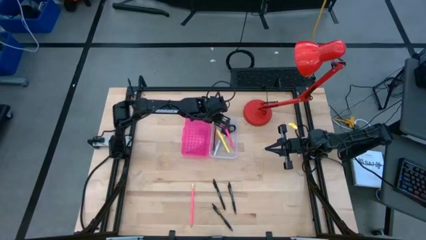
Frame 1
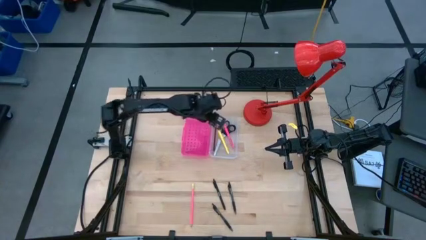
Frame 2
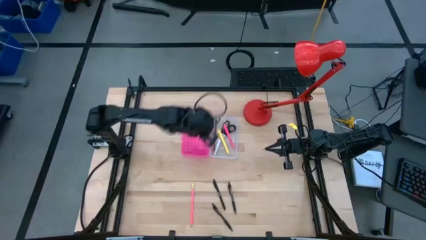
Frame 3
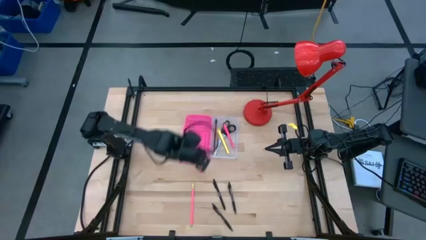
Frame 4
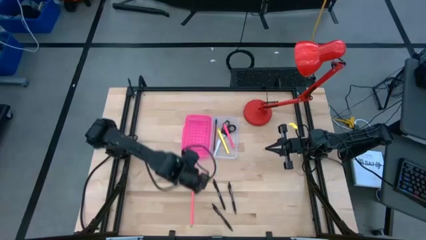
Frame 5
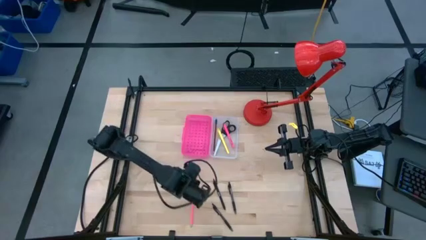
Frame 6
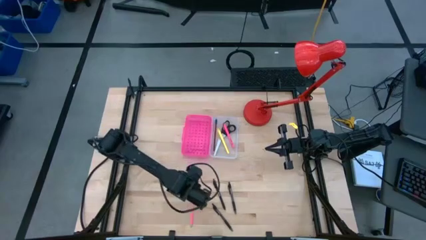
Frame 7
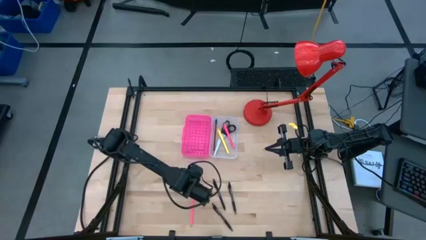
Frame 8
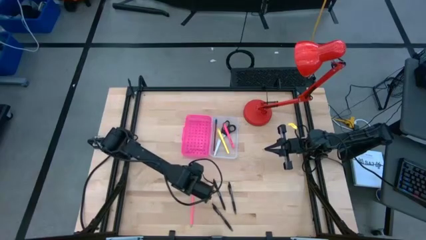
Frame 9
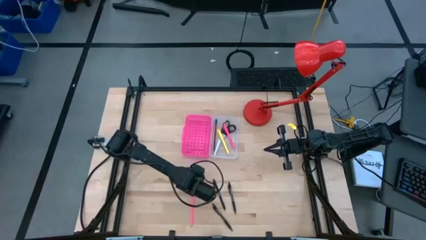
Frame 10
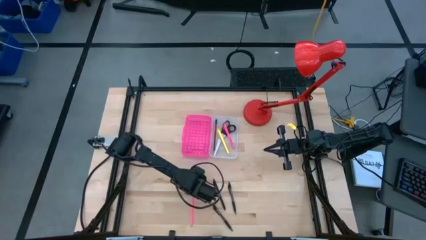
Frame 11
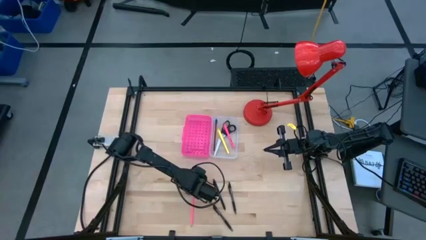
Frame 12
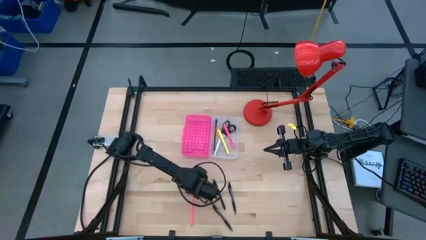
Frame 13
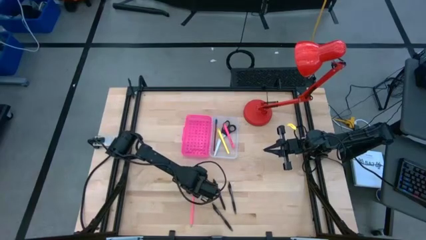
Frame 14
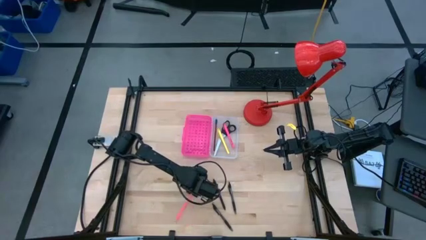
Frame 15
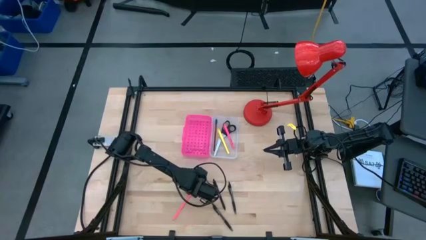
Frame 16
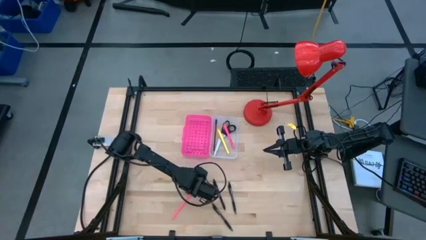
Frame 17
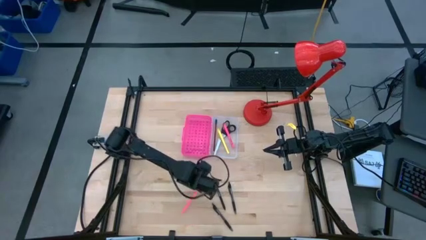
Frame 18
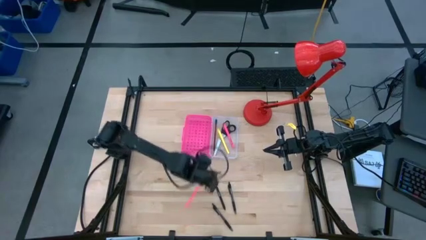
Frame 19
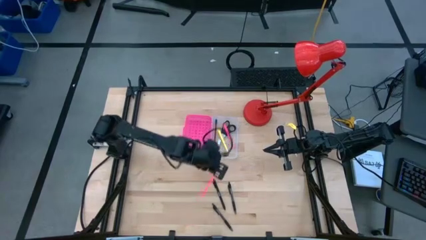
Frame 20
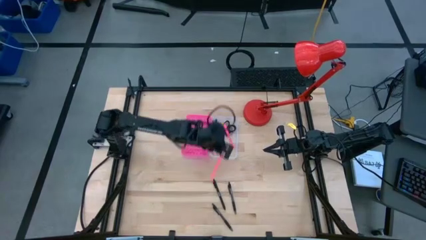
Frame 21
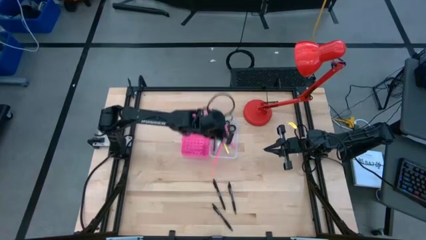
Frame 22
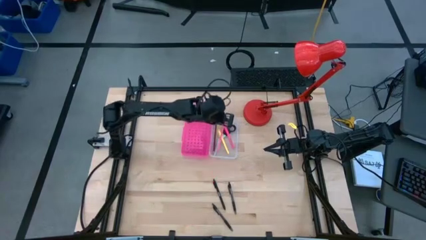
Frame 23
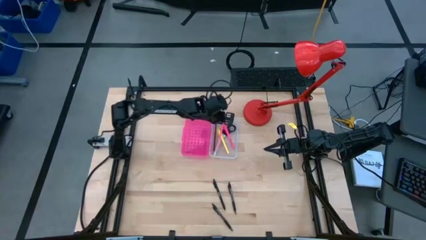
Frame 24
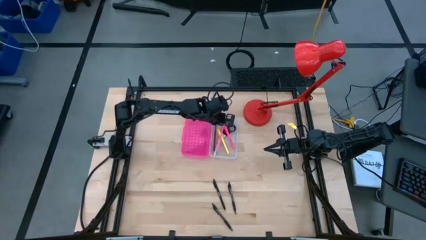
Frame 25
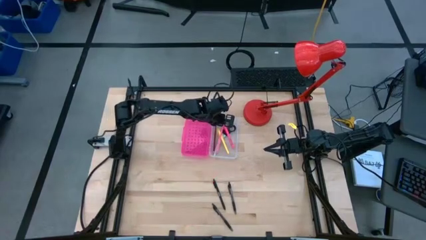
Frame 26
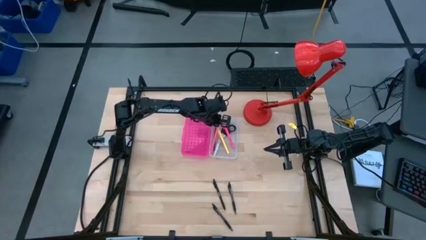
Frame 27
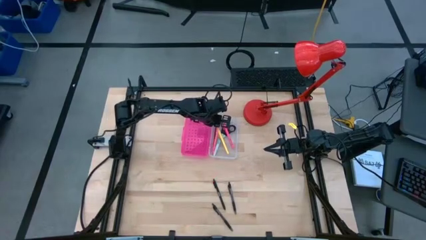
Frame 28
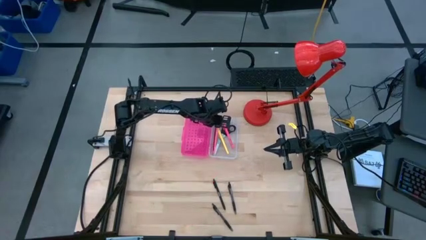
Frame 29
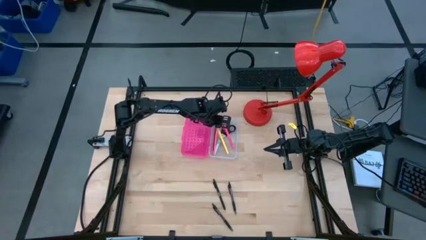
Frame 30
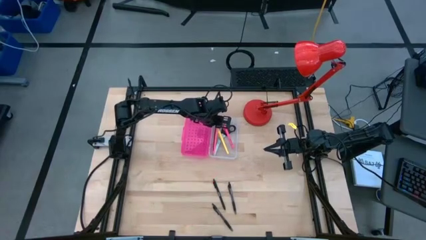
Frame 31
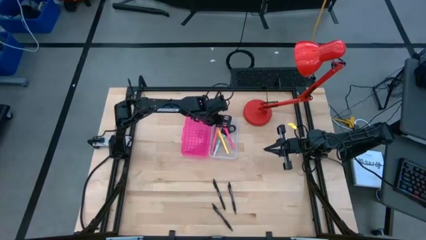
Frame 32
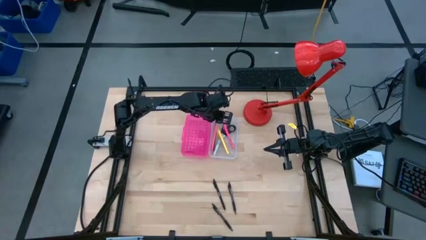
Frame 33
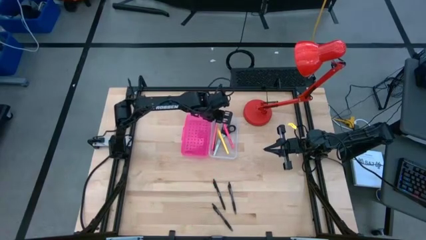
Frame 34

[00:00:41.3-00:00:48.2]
Task: Pick & place school supplies into a supply box
Put the pink supply into the pink supply box

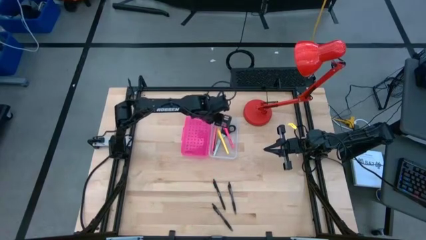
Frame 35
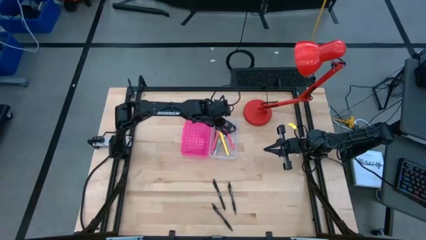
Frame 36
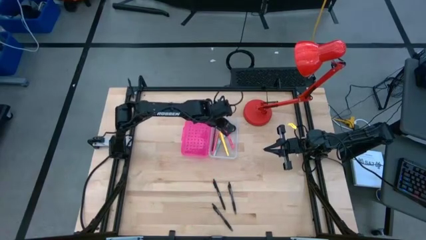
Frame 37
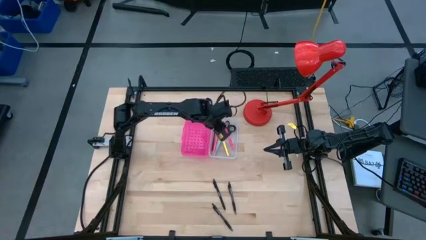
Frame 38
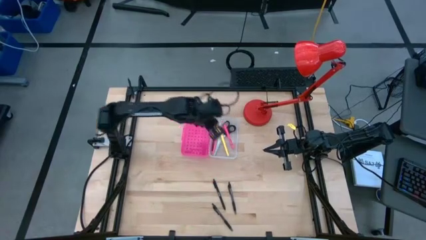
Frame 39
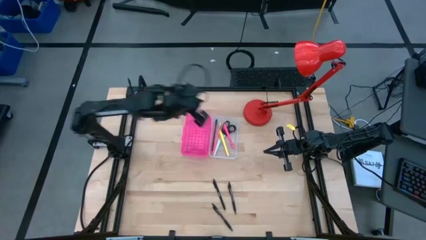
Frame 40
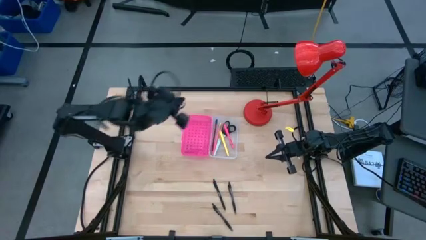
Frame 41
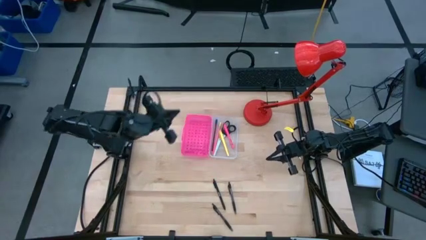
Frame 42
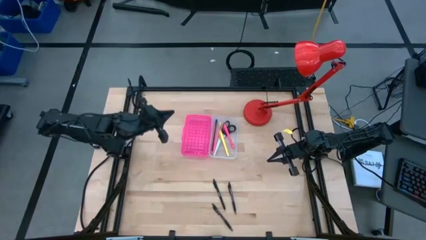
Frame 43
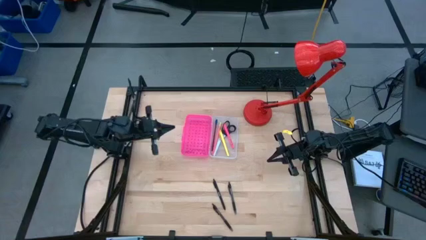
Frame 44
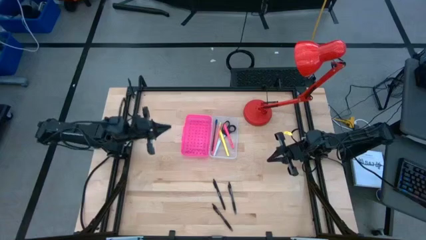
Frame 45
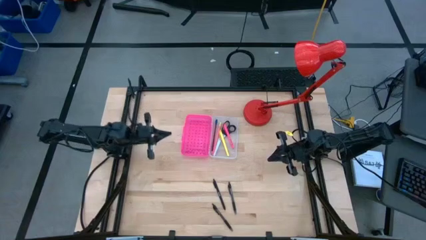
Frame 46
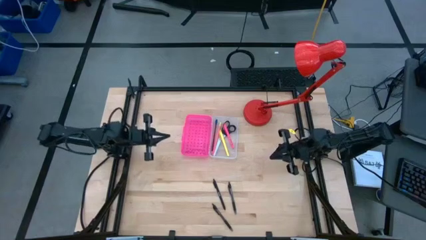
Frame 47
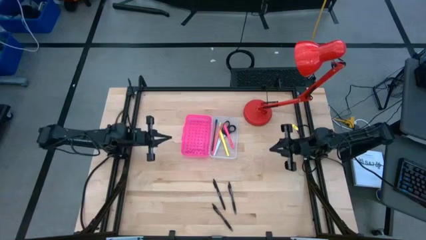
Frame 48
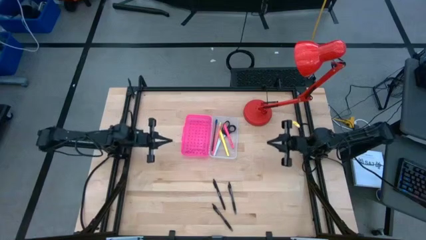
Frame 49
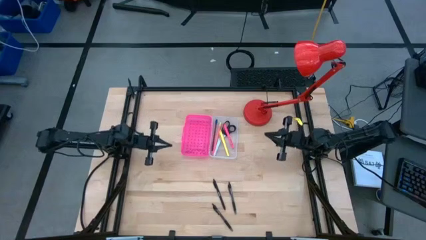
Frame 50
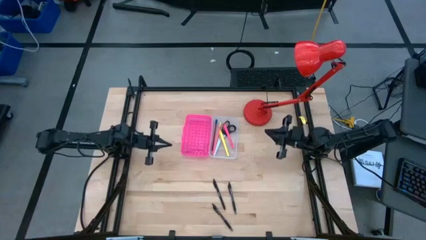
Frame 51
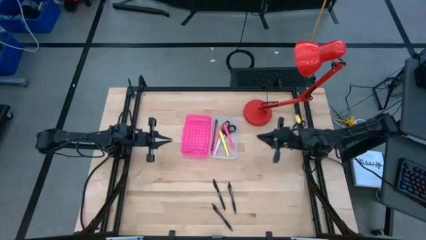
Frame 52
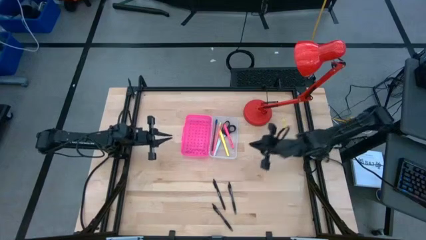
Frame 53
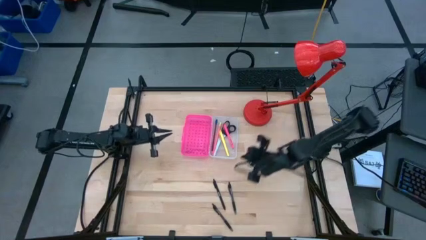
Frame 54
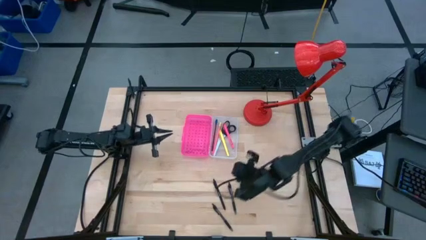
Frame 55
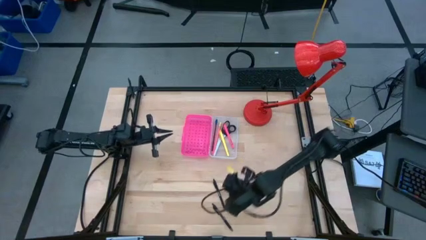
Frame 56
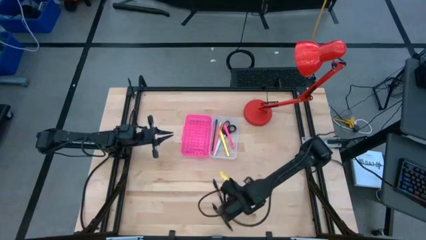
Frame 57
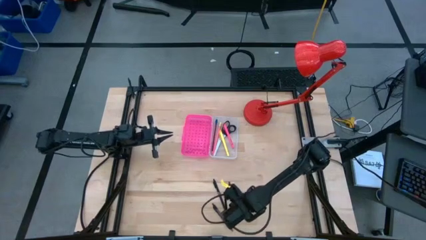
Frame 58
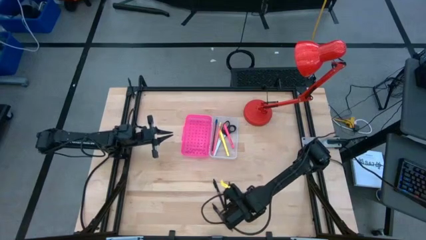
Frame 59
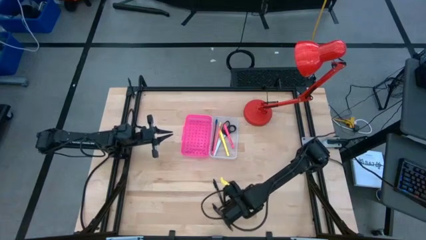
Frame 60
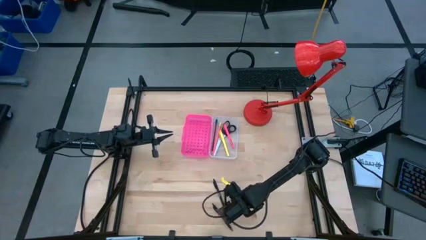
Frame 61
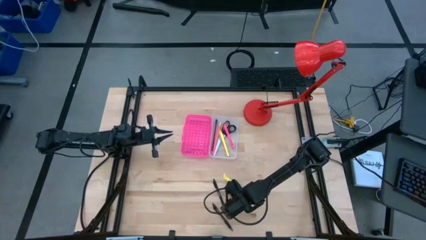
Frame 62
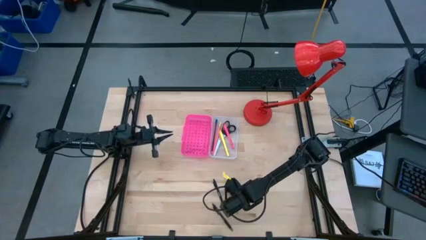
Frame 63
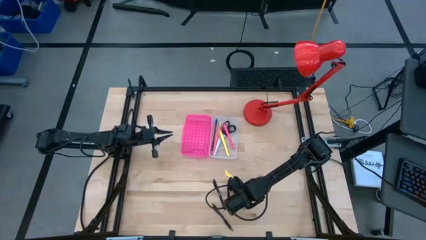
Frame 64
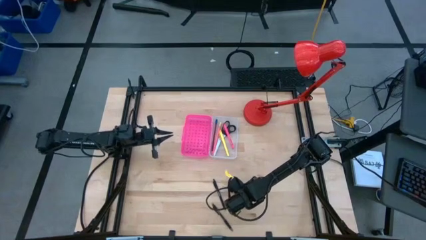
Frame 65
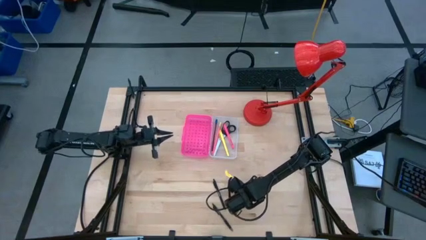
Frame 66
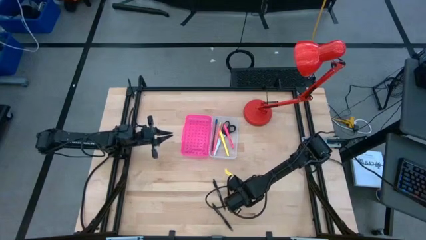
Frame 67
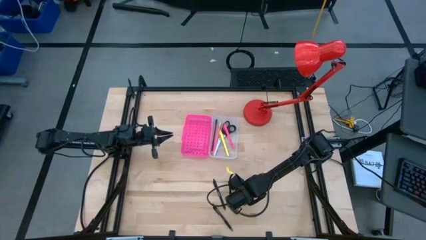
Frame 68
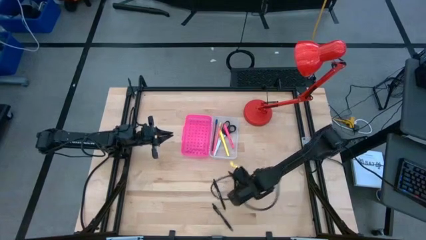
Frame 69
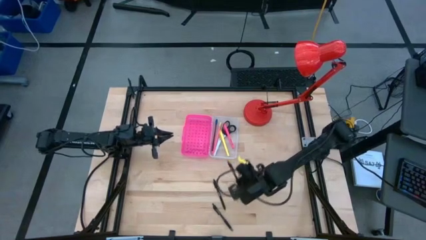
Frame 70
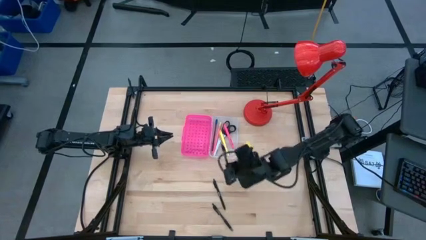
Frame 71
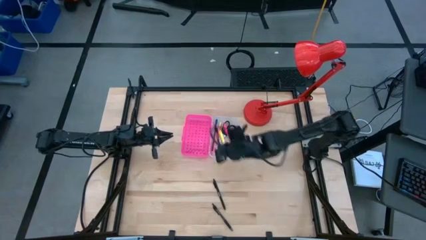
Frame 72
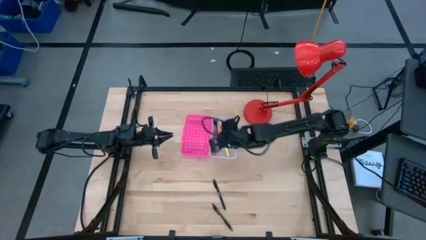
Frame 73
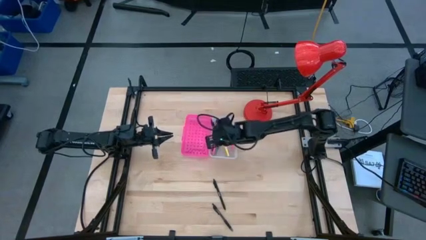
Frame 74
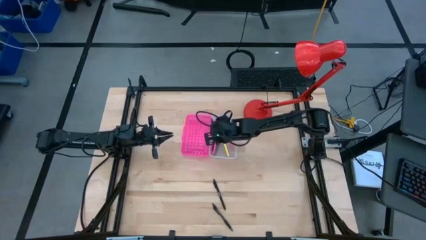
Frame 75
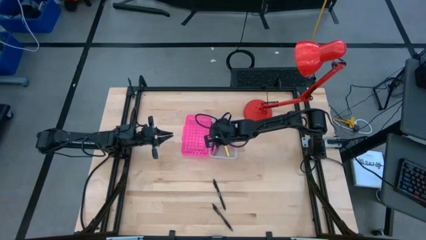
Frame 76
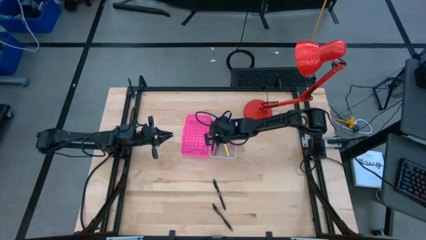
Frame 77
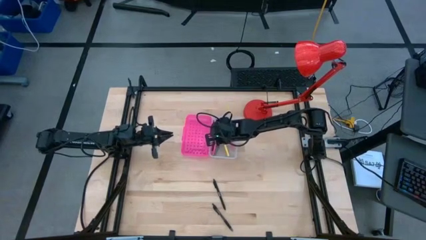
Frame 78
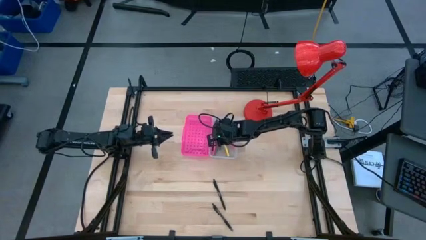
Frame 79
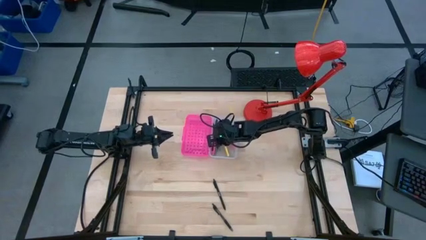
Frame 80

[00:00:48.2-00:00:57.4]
Put the top right black ballpen into the pink supply box
